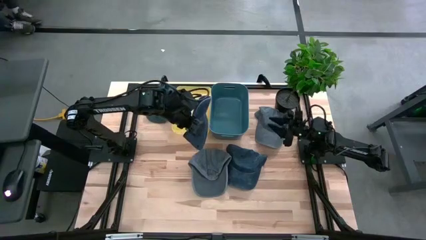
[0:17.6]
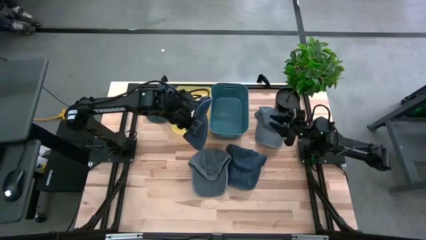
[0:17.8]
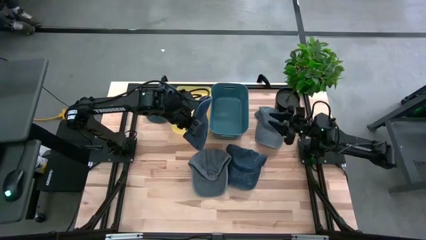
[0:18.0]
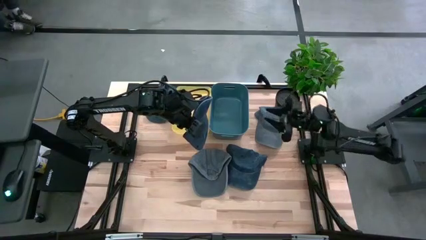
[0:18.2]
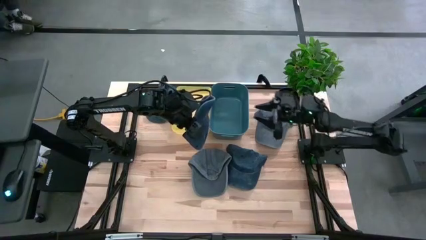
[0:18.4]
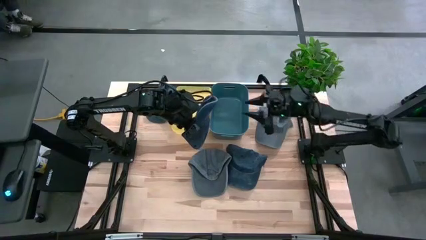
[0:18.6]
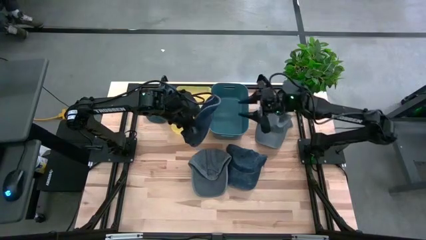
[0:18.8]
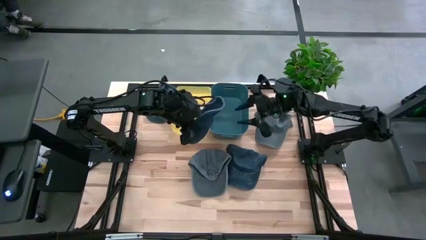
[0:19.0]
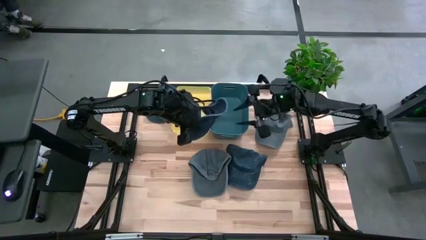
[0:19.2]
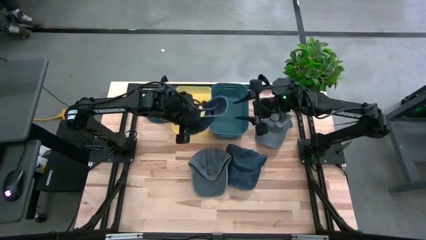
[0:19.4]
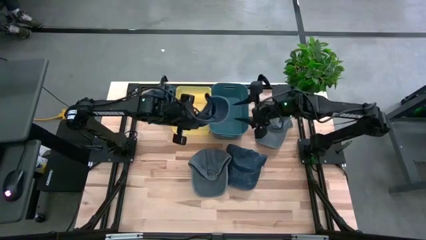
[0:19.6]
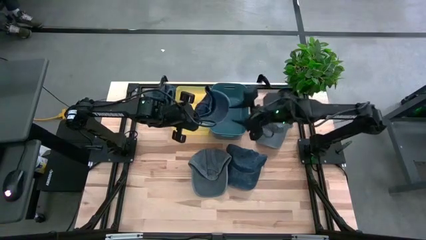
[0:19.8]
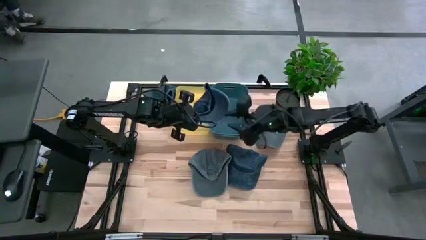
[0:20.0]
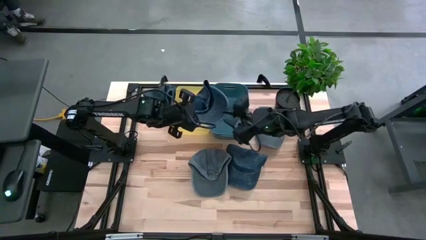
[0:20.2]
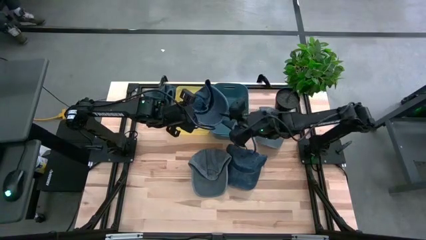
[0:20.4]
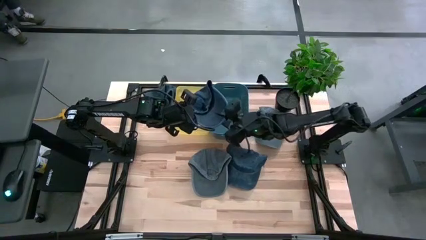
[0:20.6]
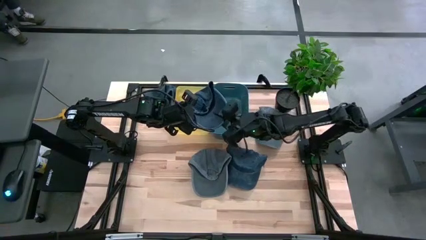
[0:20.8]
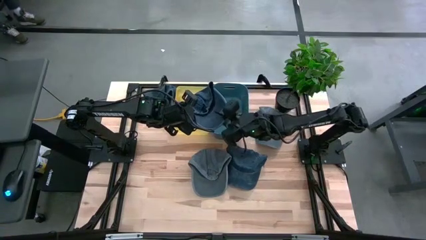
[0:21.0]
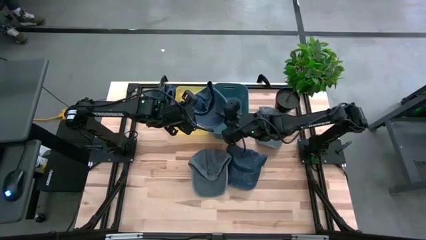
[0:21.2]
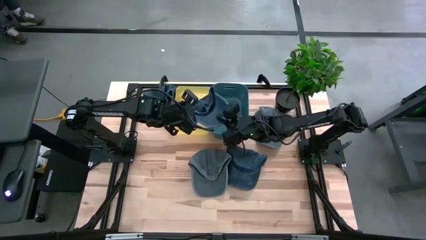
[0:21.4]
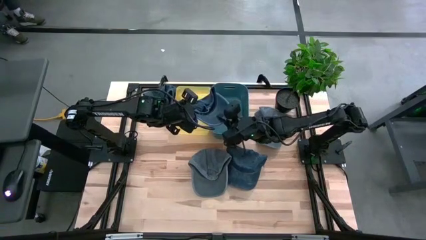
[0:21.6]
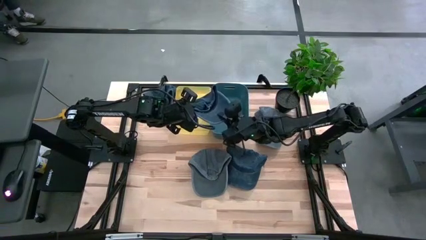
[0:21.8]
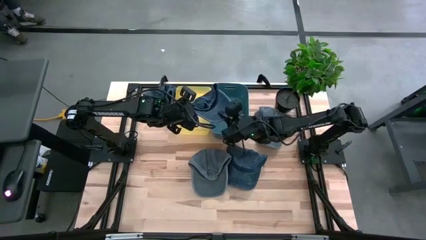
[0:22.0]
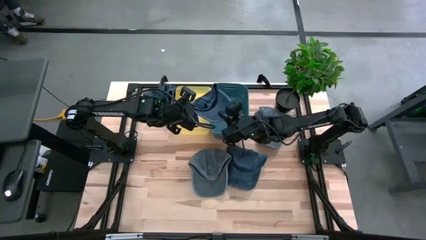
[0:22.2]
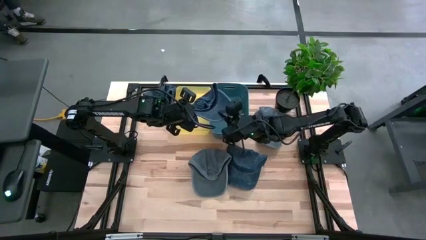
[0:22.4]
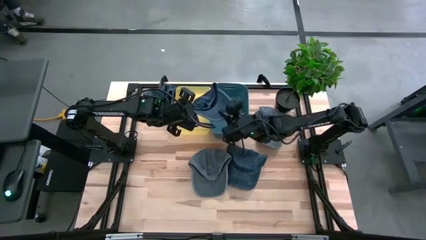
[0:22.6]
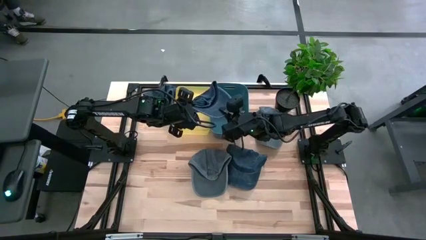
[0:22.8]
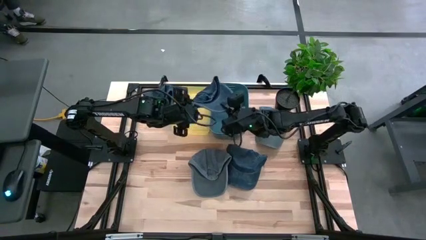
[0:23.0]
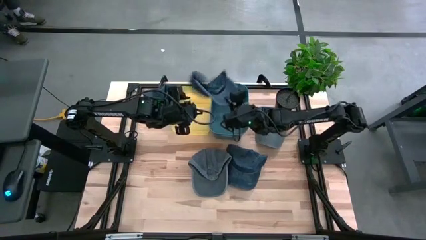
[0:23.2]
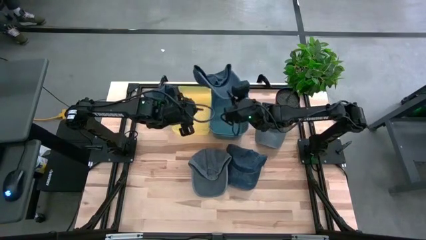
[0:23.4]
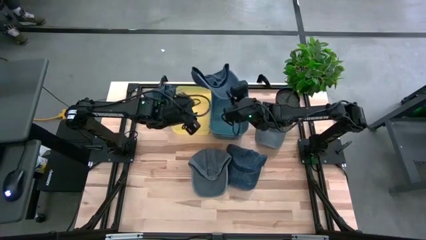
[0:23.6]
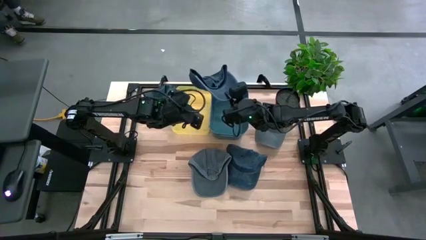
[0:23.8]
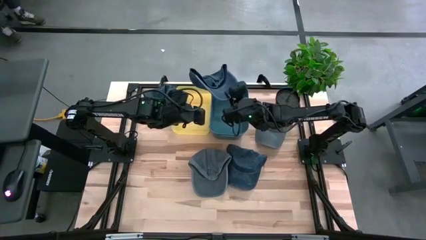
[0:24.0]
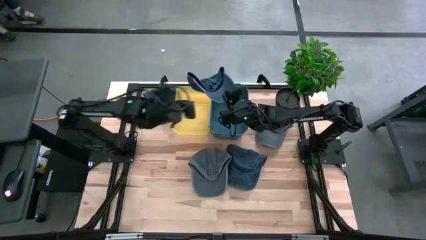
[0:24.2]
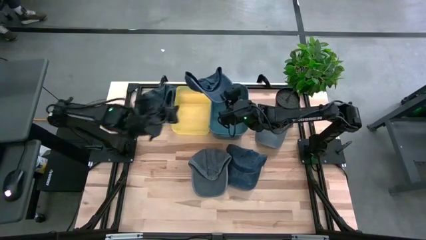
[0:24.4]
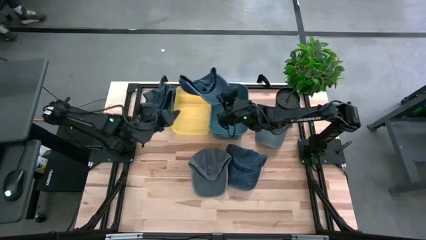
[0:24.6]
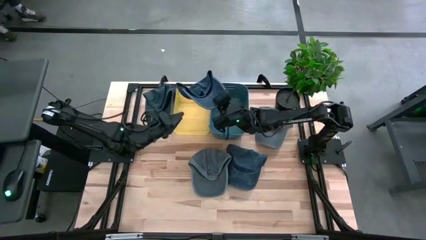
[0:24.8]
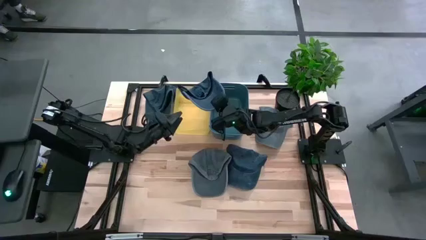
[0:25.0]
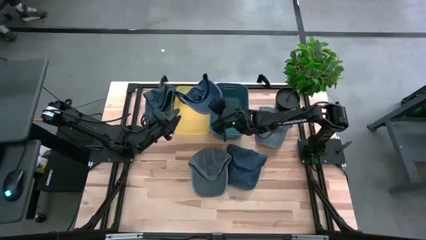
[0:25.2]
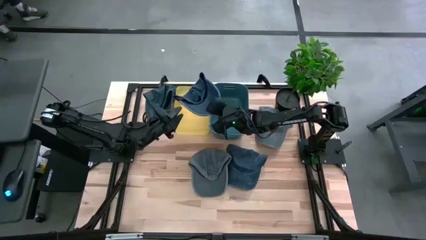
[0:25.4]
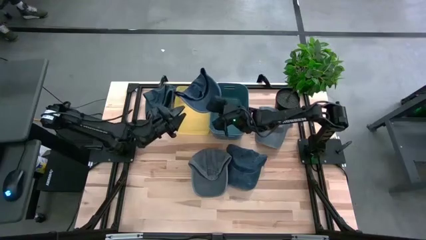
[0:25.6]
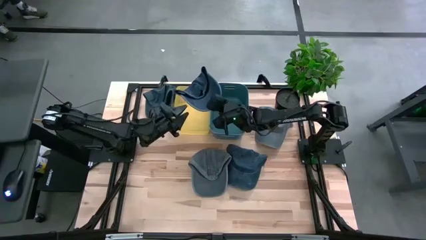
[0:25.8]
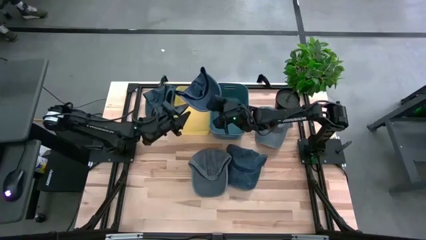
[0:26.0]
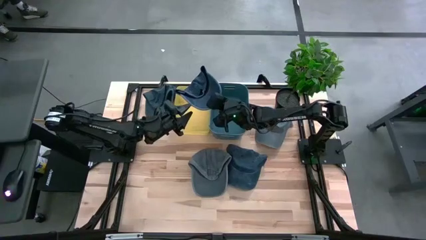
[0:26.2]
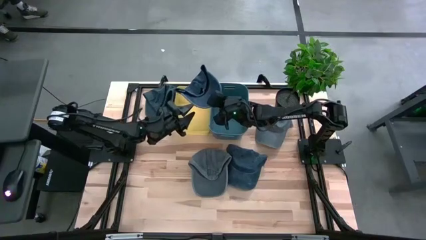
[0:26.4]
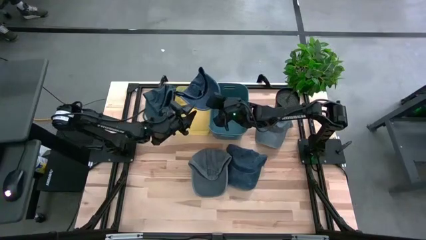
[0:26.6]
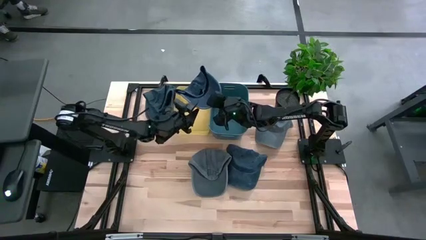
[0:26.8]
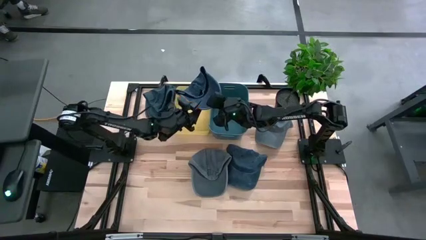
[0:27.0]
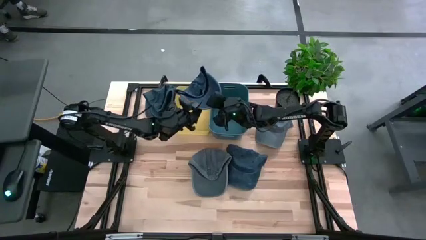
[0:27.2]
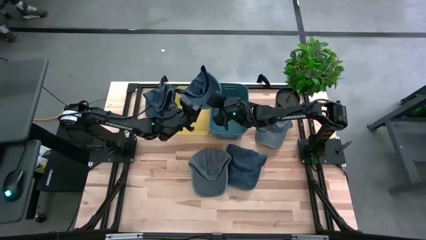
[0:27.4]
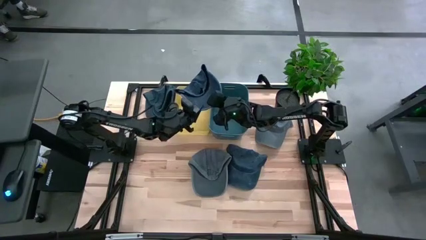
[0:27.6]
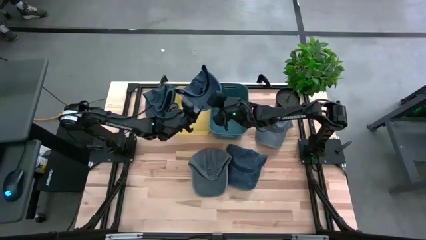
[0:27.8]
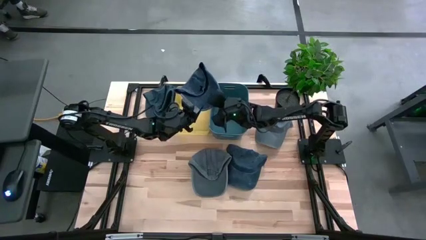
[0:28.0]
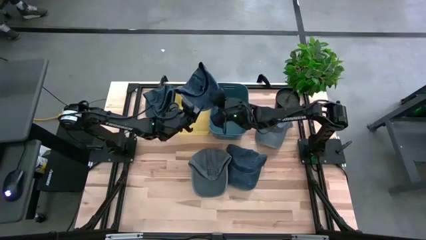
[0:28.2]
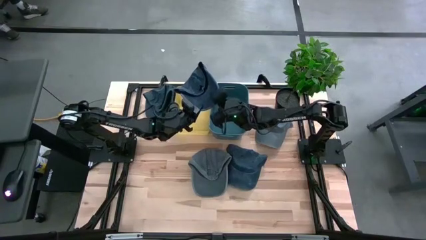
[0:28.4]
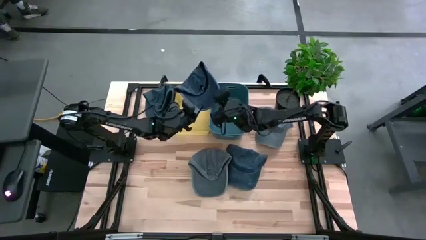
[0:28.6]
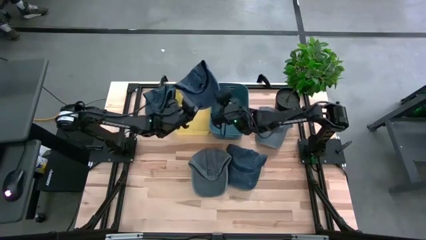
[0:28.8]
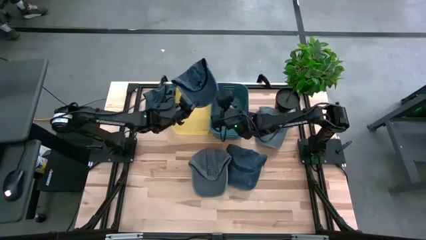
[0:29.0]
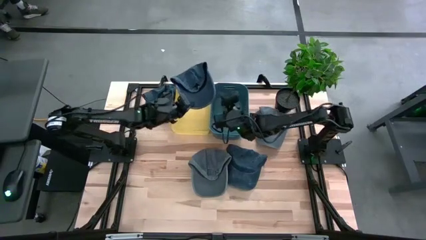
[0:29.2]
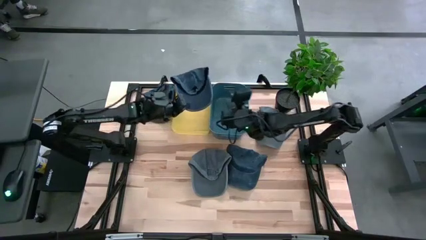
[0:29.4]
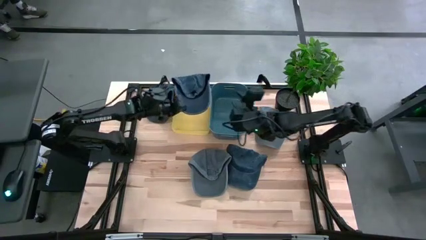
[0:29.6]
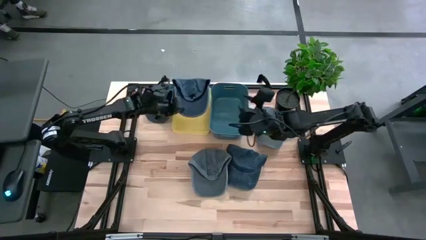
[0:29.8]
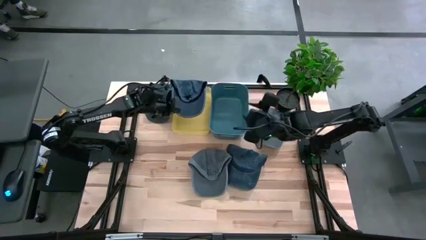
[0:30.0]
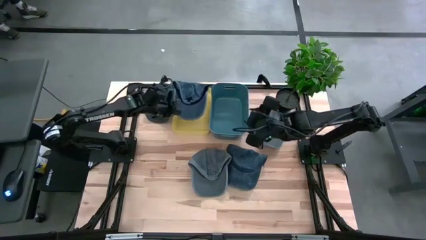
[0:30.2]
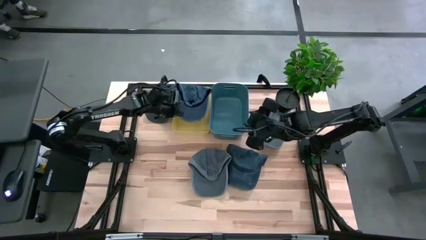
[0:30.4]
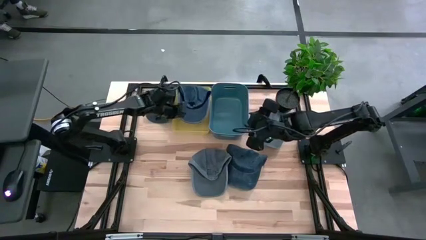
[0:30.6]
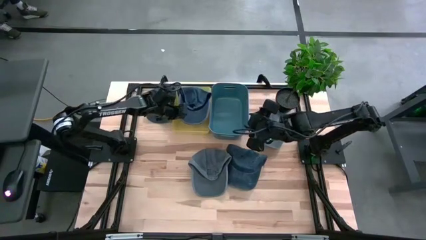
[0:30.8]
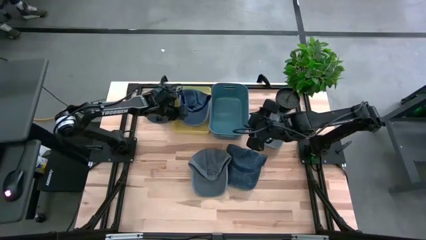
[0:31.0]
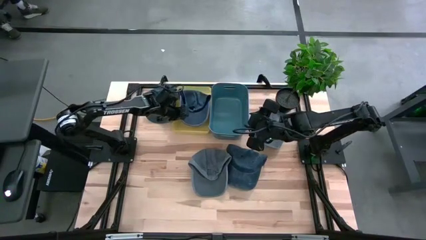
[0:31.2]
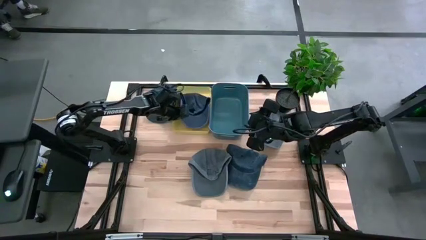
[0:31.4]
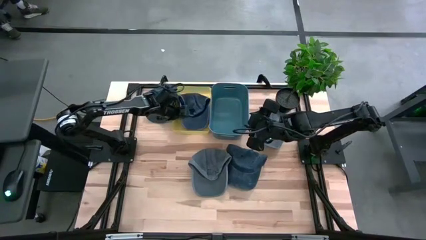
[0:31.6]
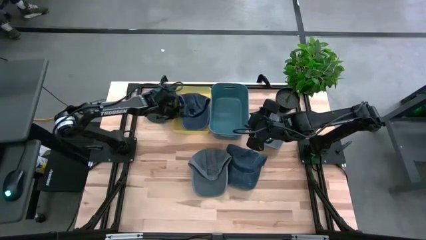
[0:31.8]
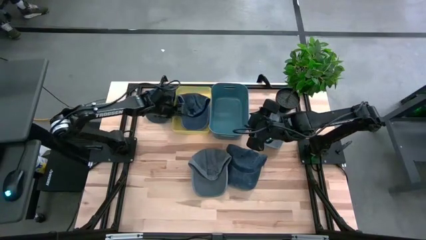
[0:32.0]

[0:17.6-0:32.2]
Task: Pick & Place hat
Put the bottom left blue cap into the yellow bin
